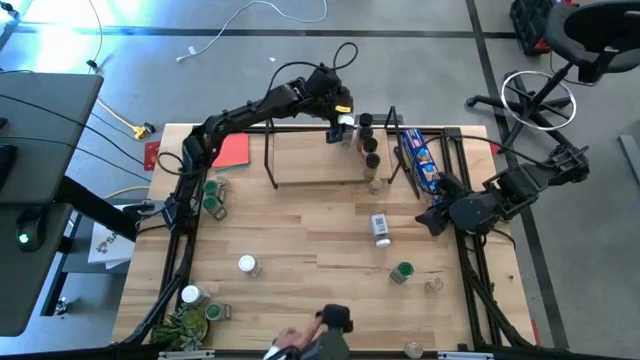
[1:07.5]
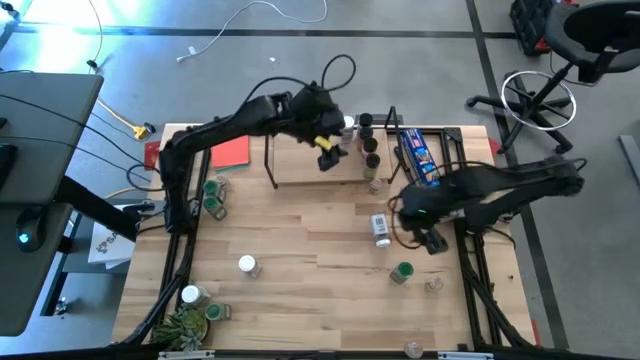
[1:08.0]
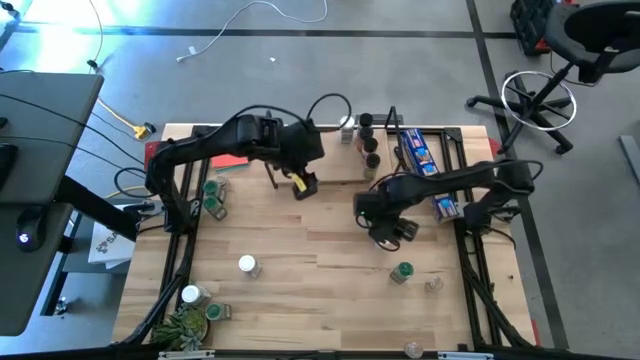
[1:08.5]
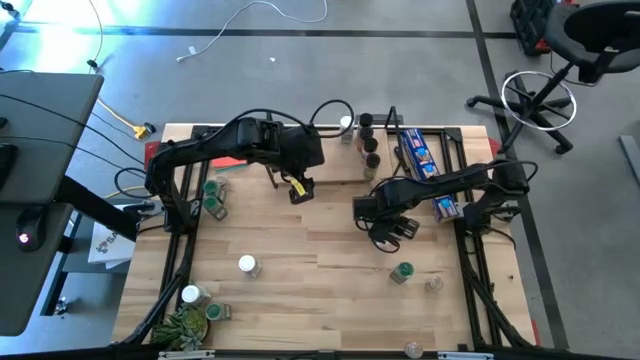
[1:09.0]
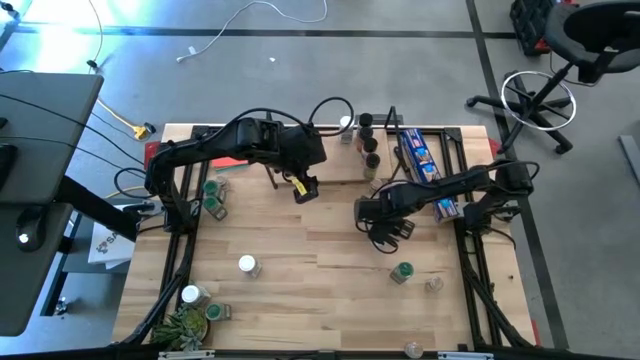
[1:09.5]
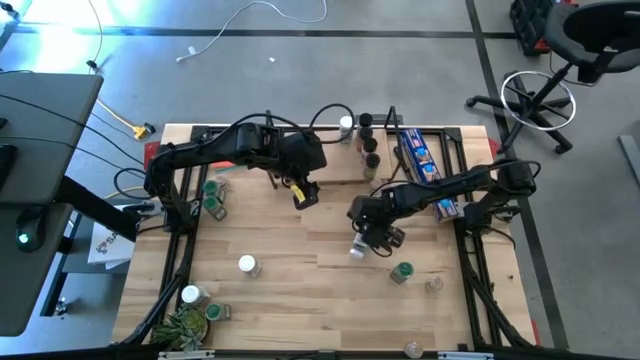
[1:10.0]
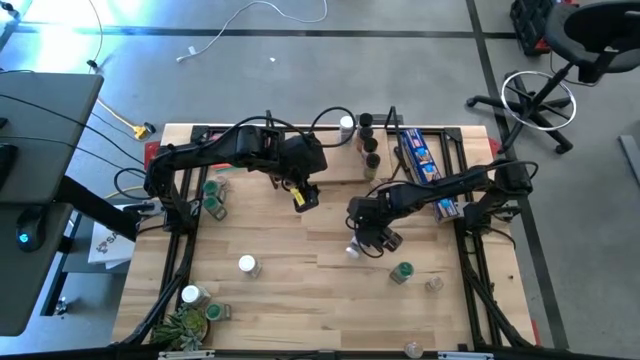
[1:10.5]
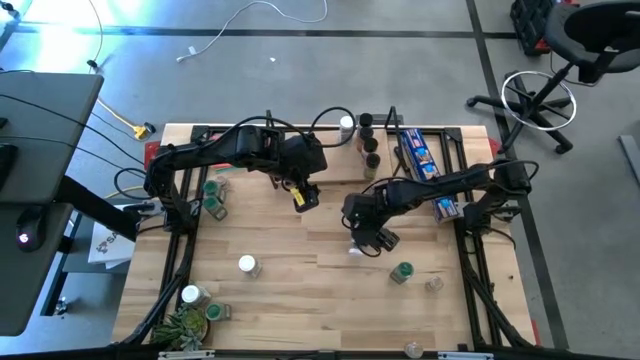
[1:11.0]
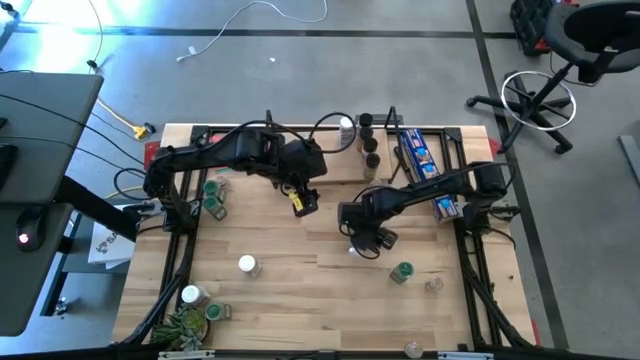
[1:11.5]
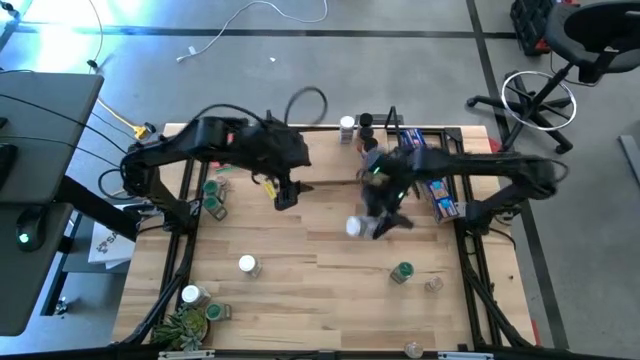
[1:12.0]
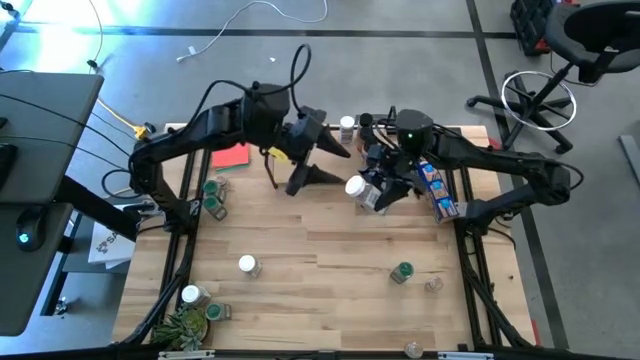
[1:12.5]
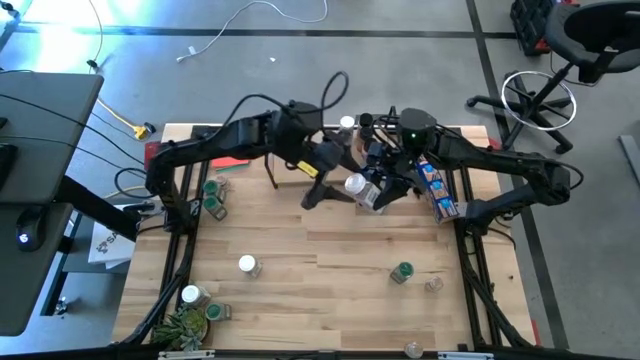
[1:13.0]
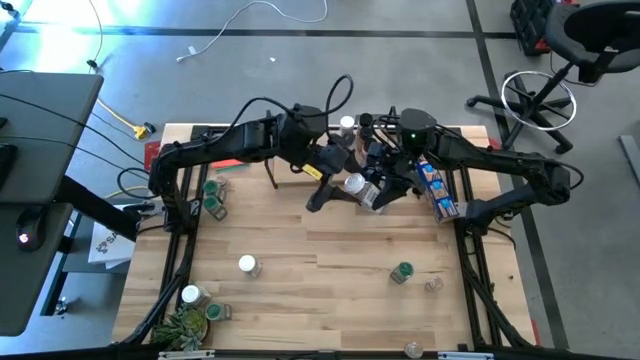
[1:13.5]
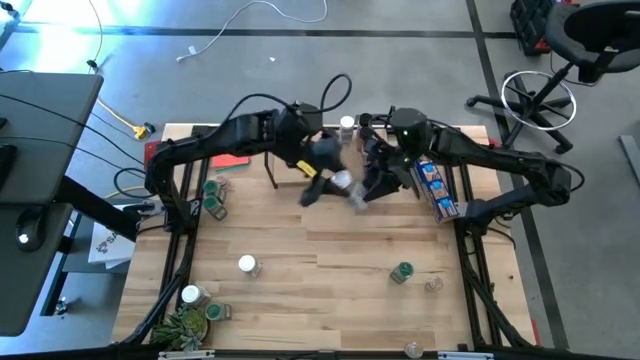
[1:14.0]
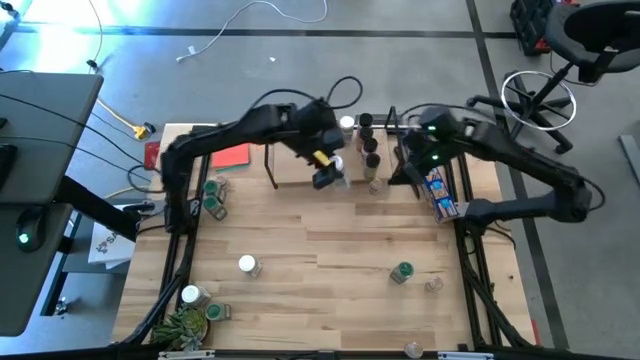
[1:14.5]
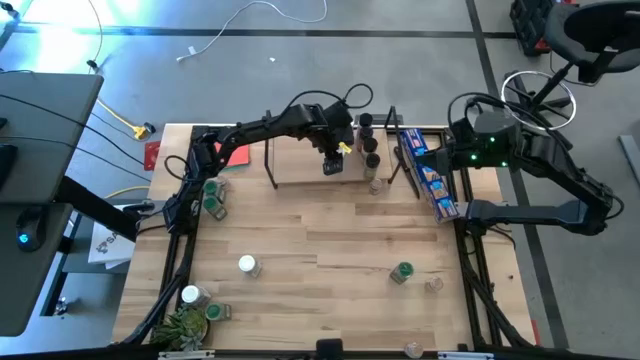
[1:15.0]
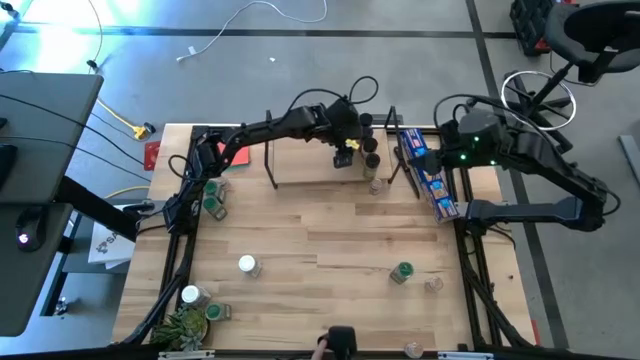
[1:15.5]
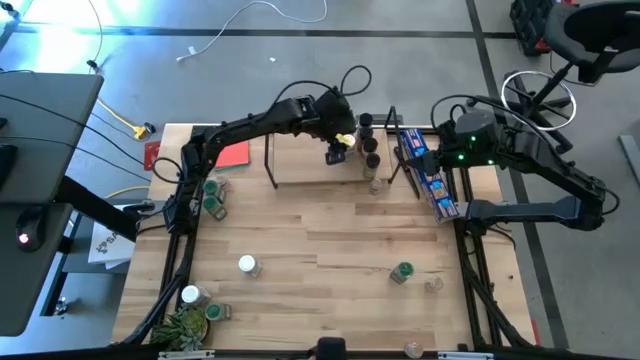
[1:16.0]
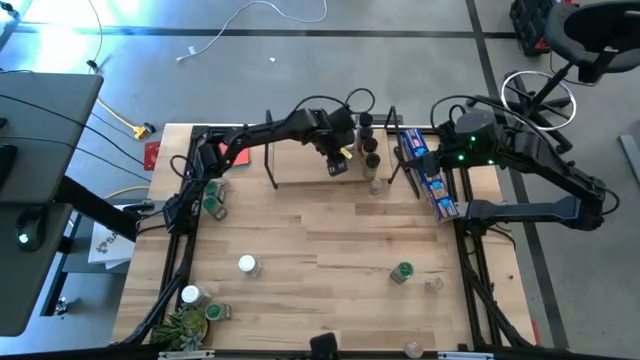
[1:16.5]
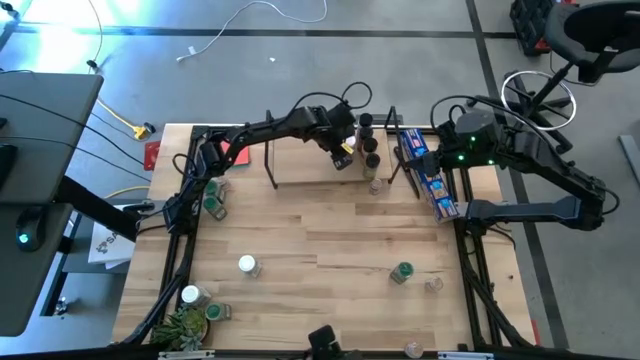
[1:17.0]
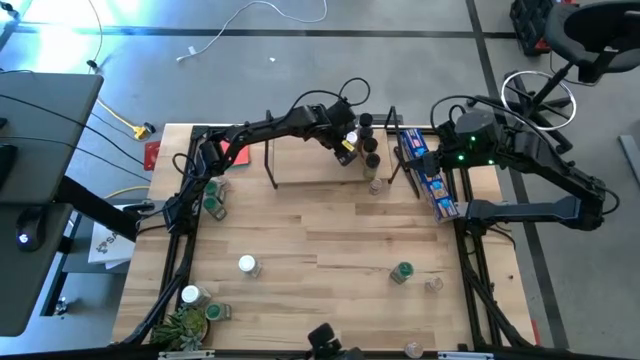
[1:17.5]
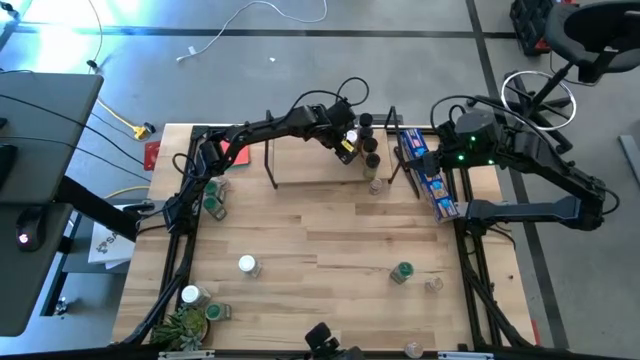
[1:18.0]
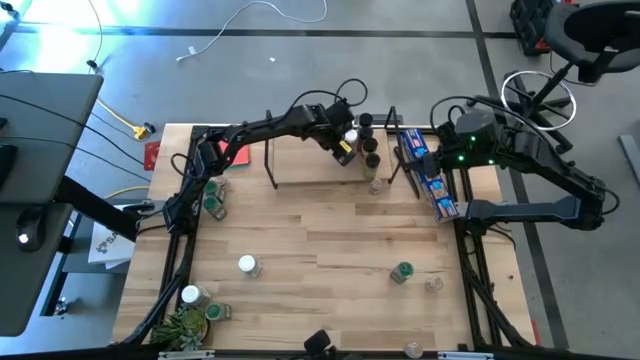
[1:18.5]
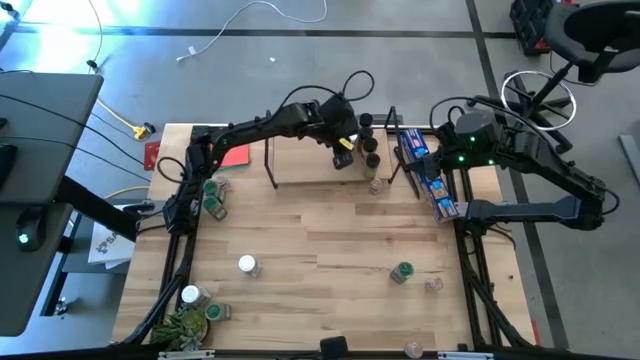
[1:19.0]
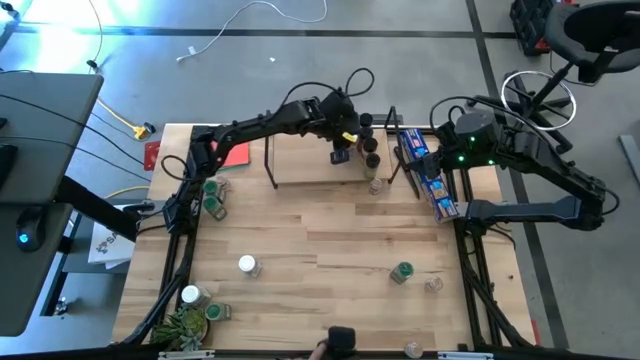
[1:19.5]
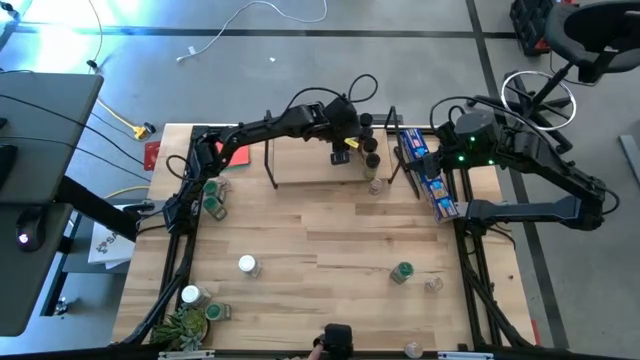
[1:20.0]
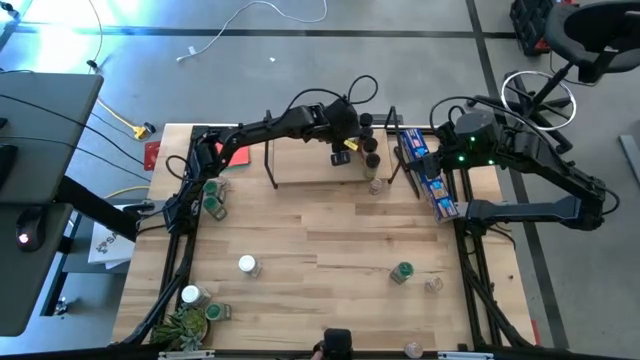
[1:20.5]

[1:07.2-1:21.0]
Task: Shelf spices
Put the top right white seasoning bottle on the shelf aligned with the other white seasoning bottle

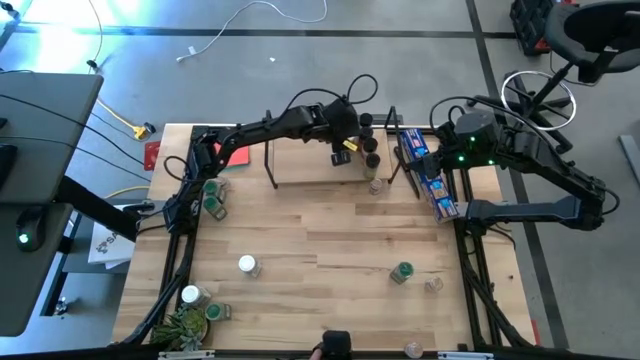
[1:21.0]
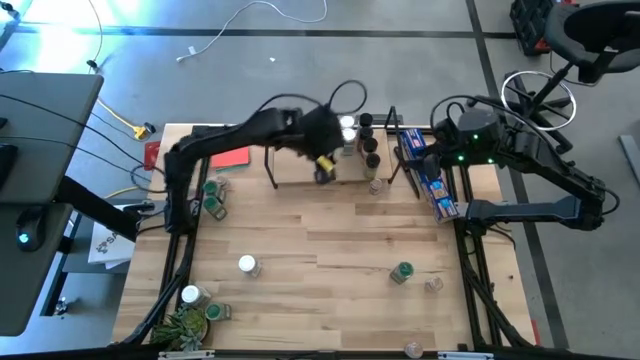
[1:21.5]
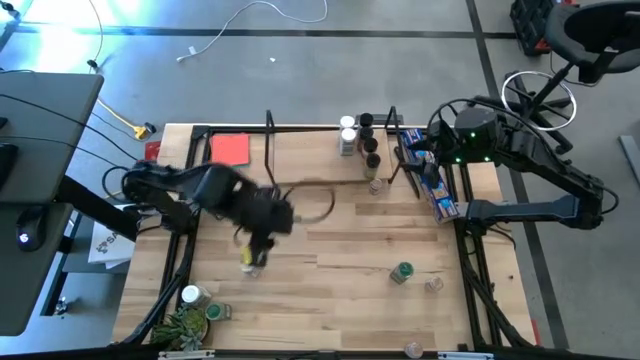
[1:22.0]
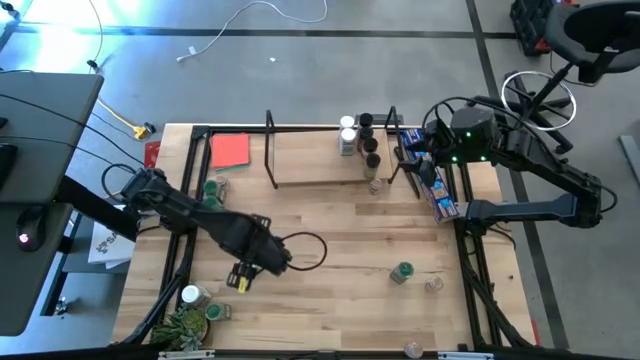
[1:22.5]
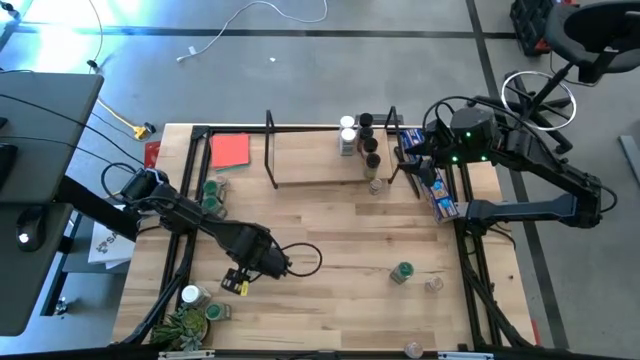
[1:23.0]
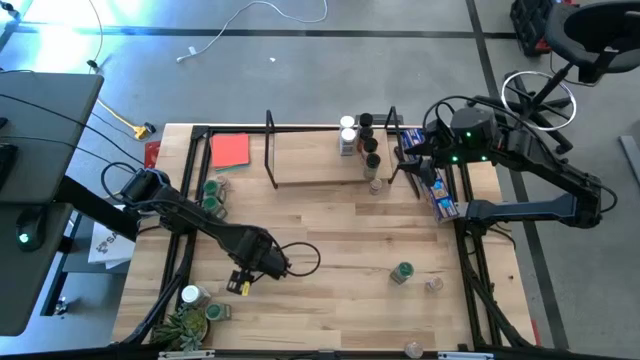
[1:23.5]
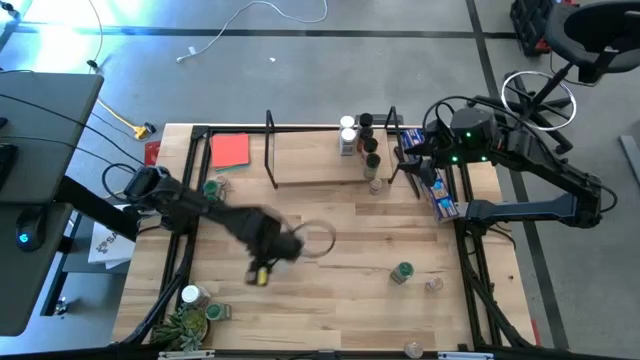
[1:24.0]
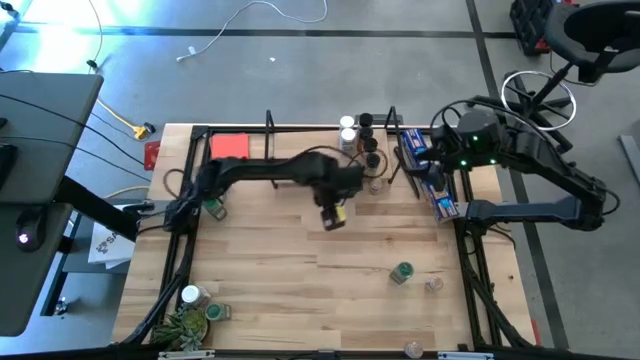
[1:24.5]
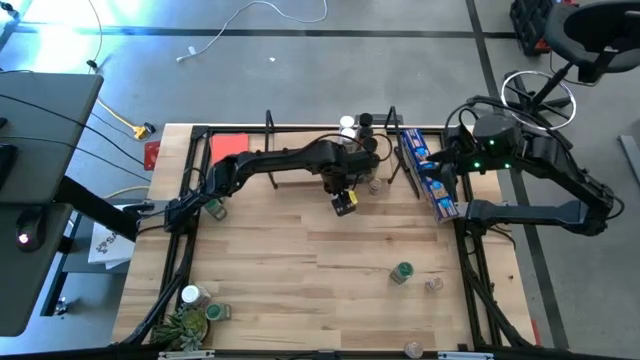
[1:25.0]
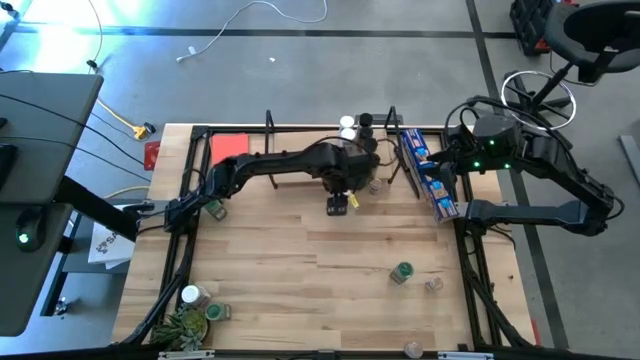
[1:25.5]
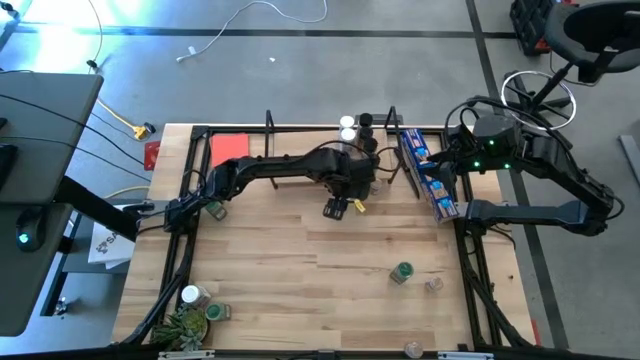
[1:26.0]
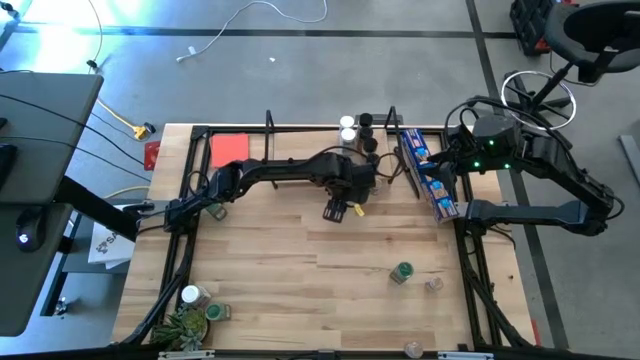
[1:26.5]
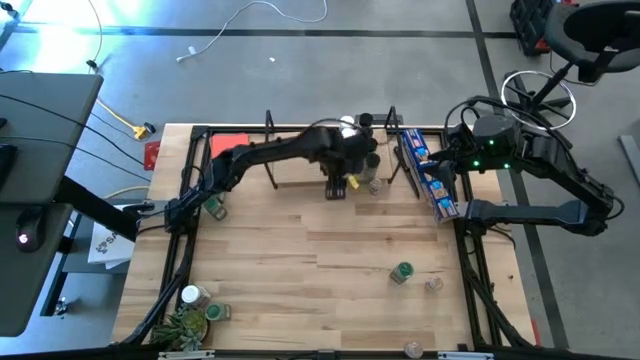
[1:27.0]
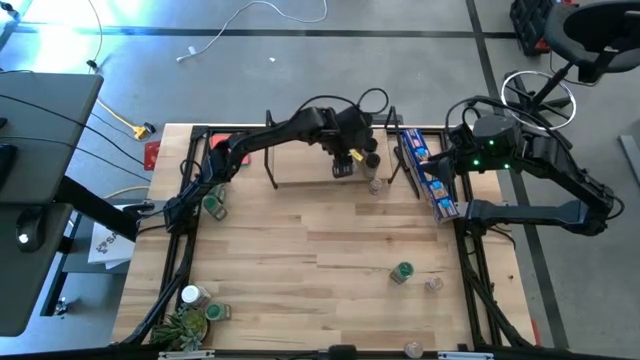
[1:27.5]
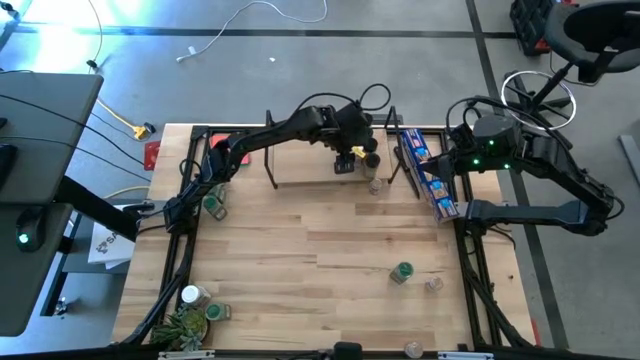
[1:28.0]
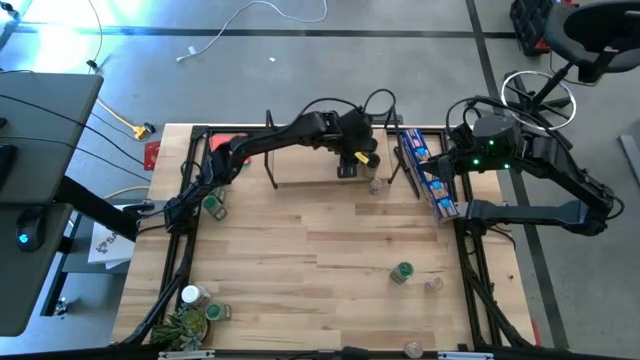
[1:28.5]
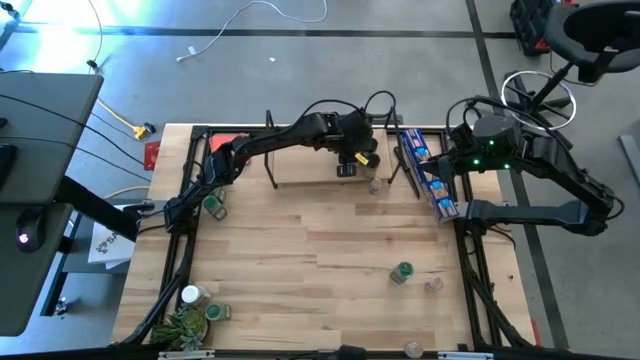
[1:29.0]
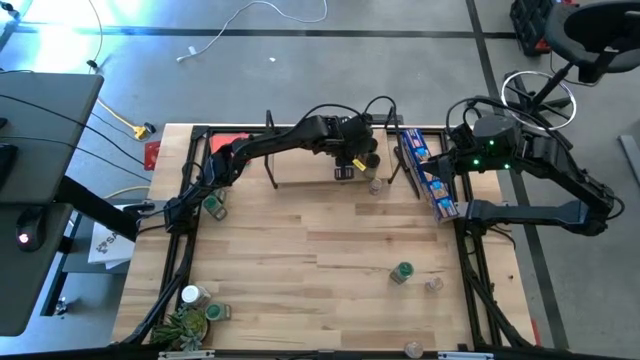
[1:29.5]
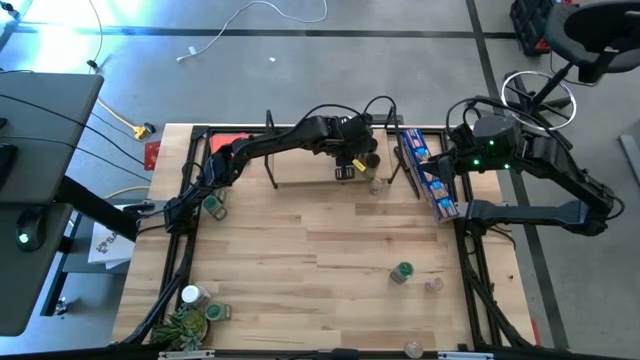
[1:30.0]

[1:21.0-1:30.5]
Put the right white seasoning bottle on the shelf aligned with the other white seasoning bottles
